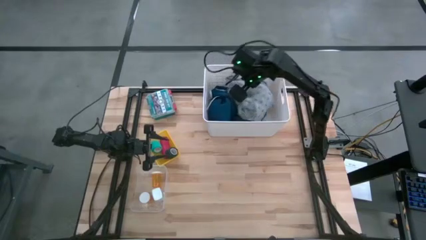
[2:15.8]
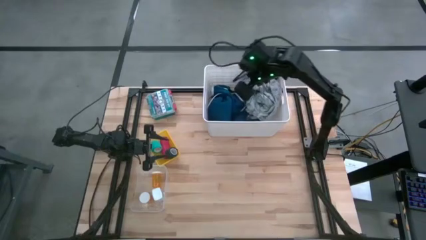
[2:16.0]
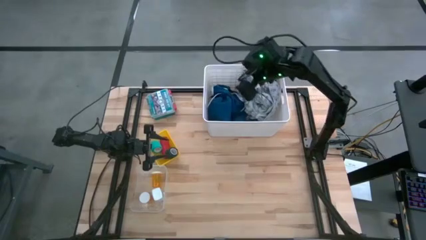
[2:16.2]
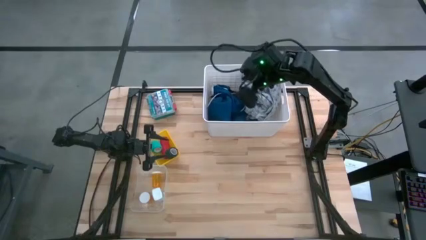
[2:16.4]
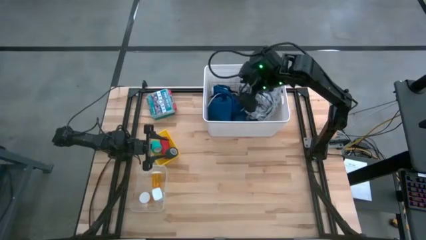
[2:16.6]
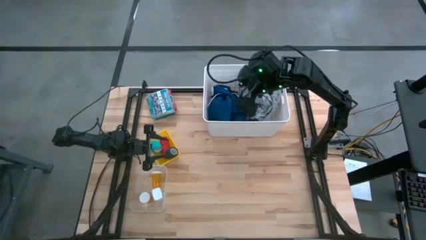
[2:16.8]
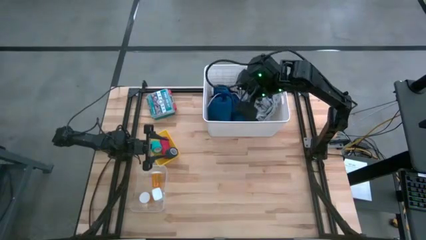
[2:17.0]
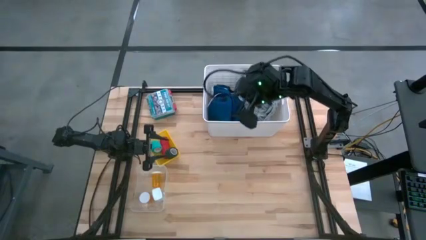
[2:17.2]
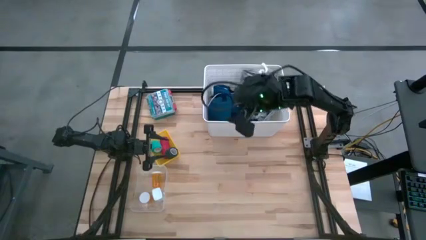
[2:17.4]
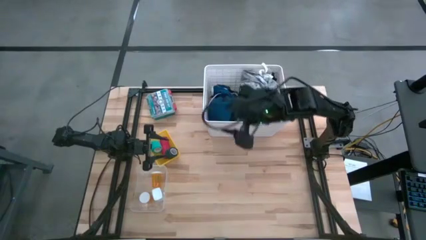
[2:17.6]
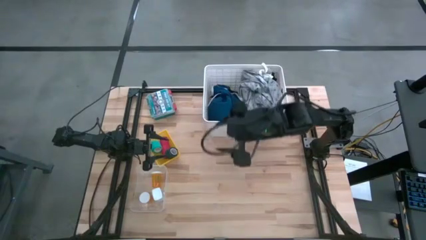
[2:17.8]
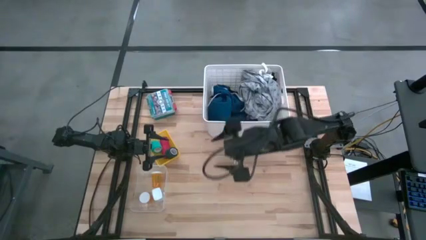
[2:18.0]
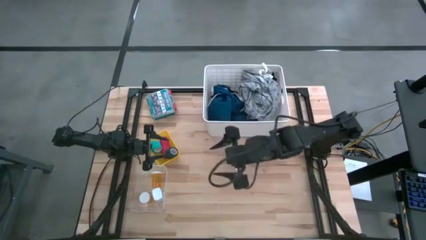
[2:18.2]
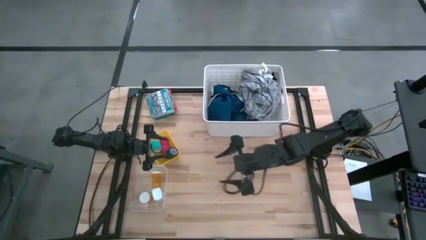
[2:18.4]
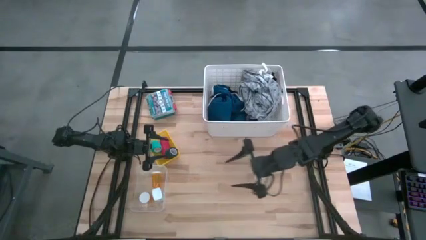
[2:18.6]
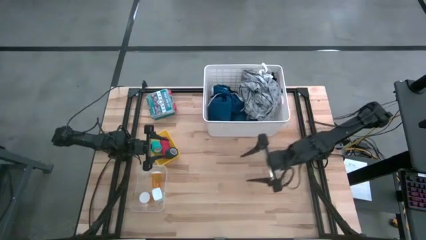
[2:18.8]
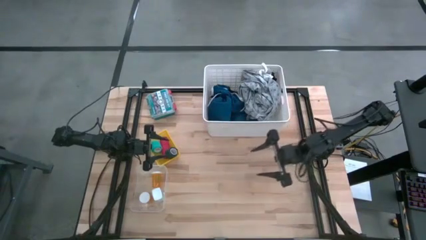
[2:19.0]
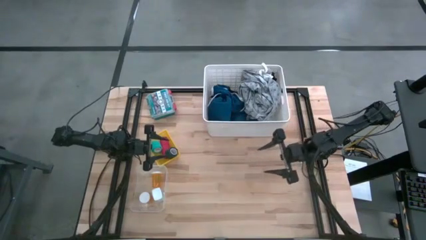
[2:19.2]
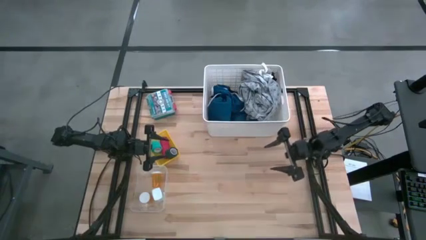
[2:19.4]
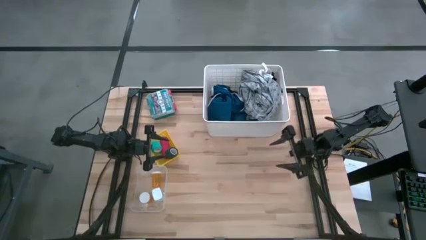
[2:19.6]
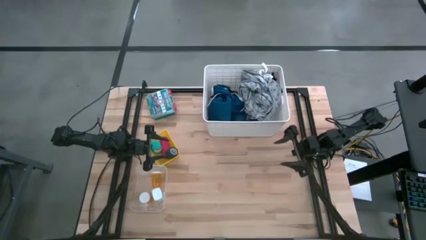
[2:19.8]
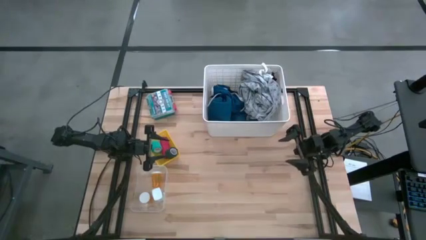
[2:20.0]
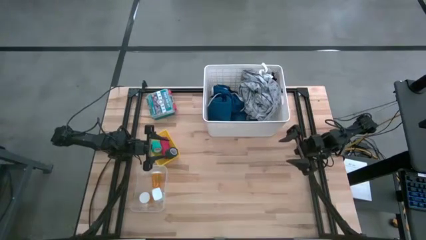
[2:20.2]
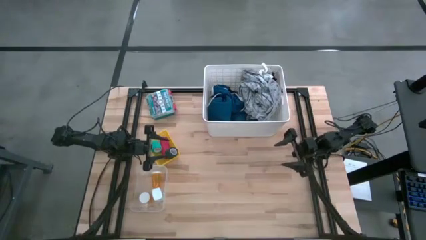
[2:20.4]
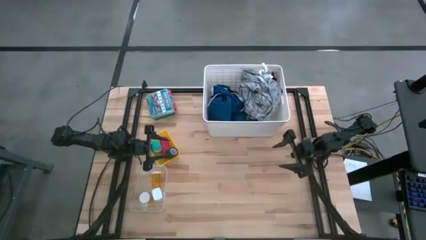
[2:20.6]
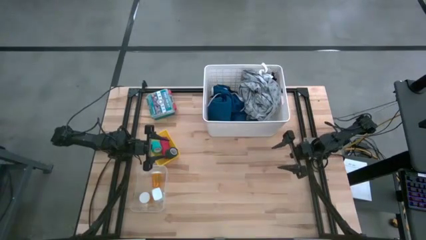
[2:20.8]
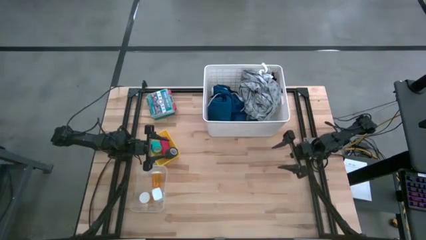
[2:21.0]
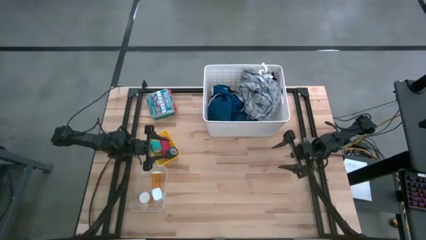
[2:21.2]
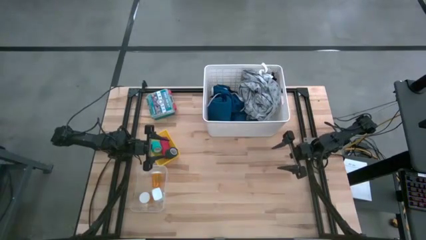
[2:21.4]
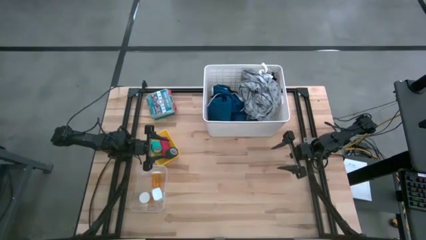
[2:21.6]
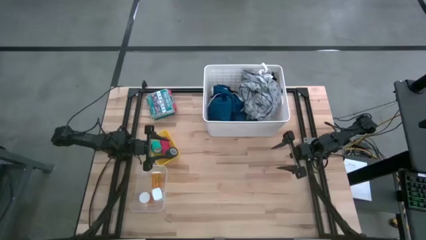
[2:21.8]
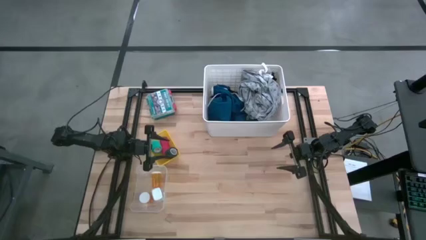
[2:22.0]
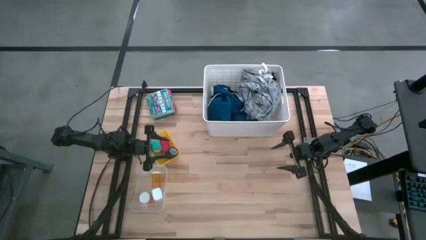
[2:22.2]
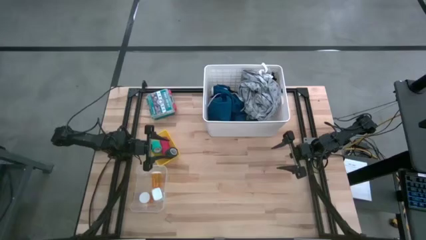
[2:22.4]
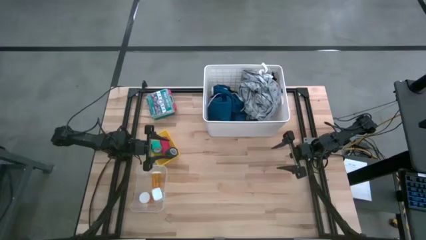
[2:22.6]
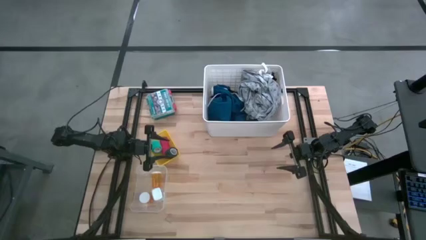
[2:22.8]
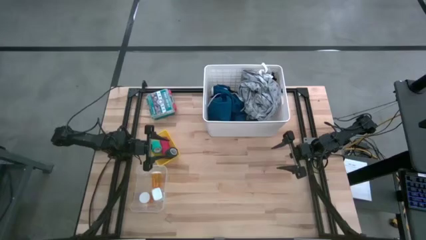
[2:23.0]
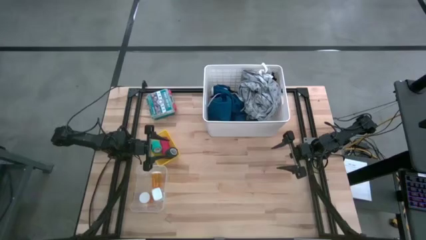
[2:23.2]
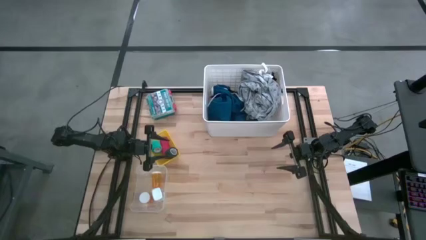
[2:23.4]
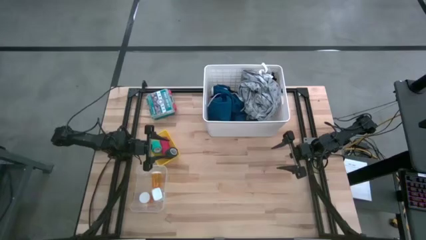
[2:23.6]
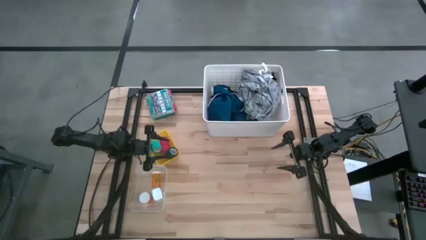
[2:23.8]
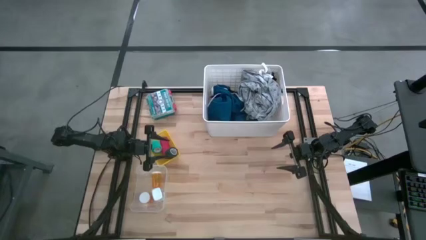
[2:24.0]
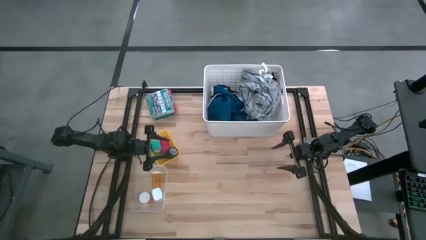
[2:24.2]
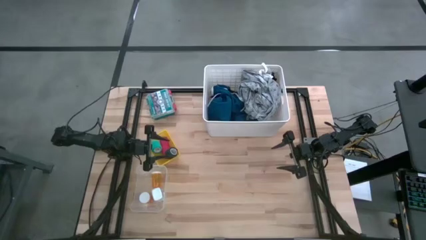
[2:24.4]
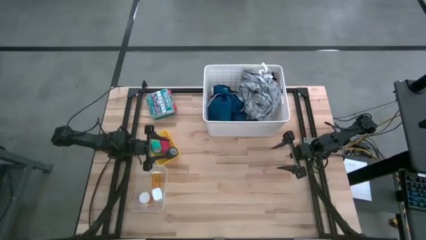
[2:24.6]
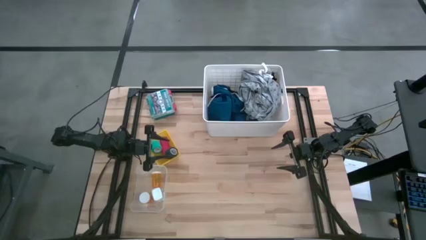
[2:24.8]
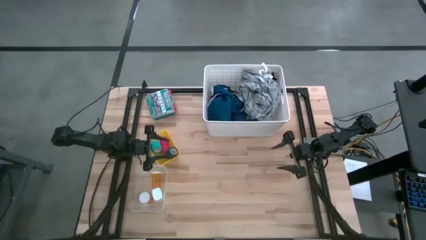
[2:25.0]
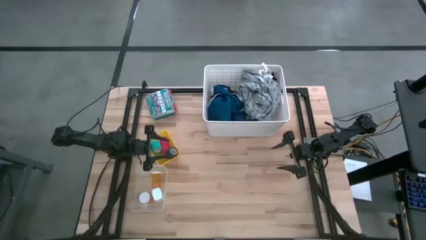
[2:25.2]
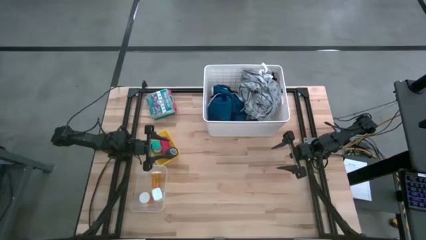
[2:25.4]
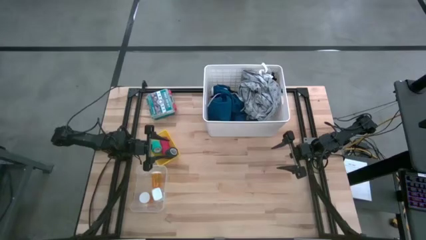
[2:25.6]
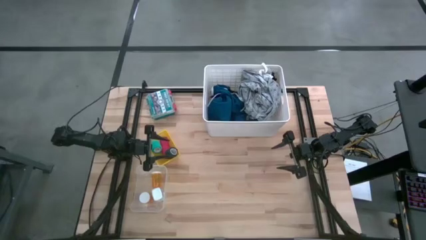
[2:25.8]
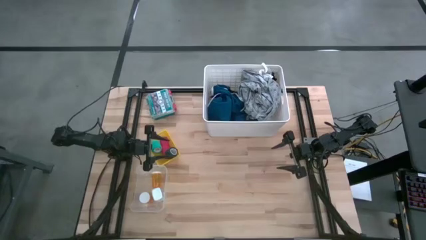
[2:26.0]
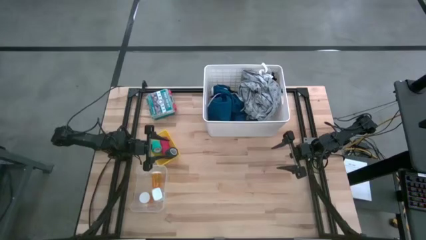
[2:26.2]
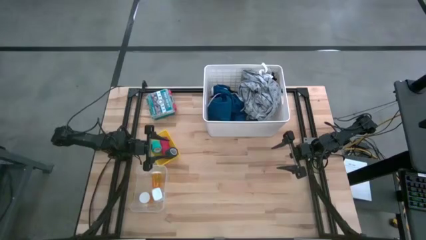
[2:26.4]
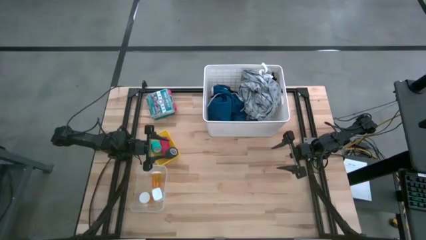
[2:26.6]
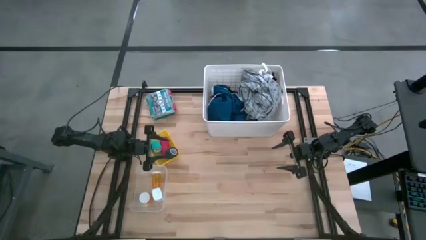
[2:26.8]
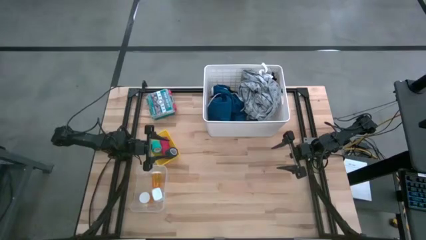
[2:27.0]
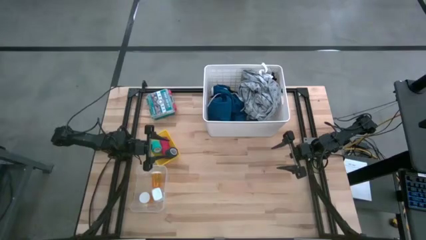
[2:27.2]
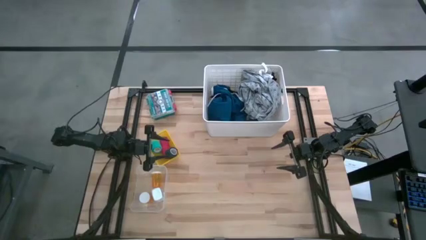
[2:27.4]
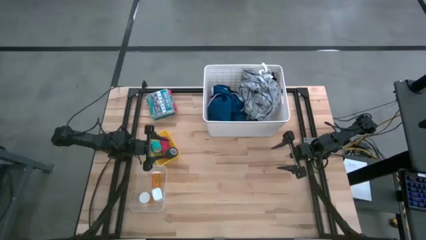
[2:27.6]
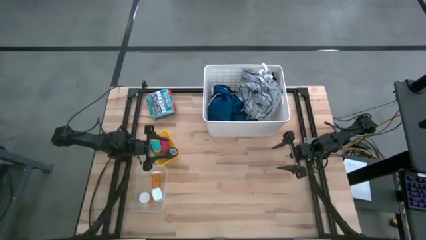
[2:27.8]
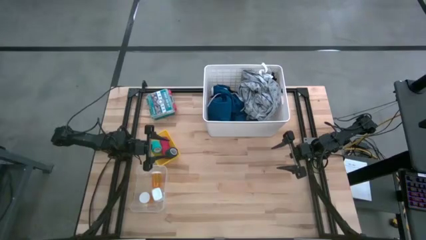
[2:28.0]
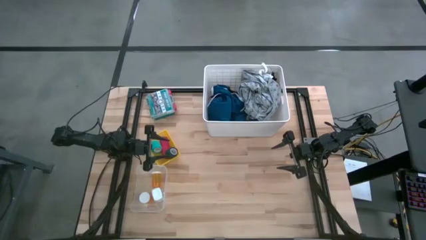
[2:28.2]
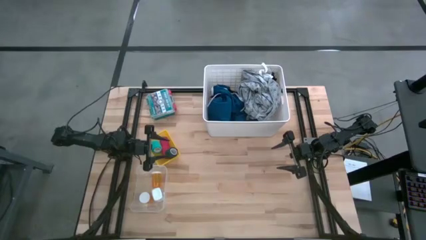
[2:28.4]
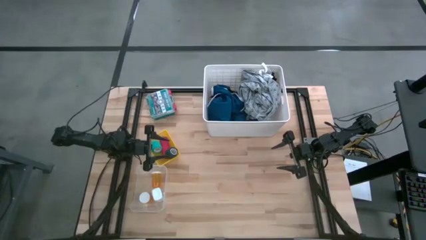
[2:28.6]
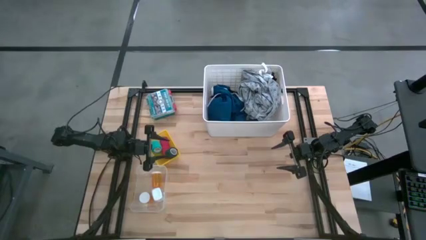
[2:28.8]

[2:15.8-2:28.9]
Task: Pick & place medical supplies in basket/bin
Return to Home Position
